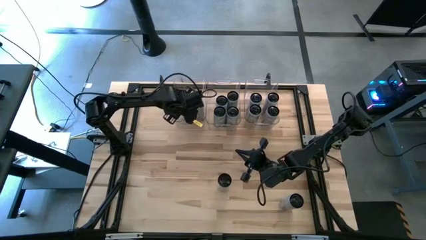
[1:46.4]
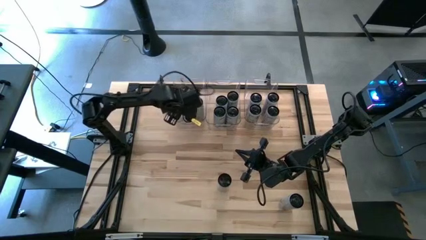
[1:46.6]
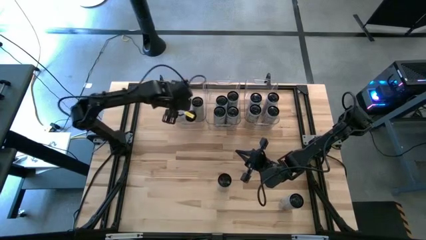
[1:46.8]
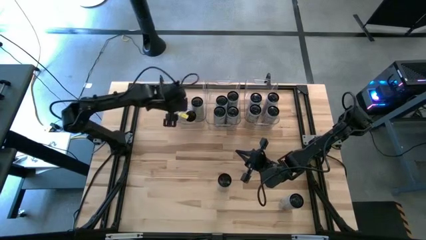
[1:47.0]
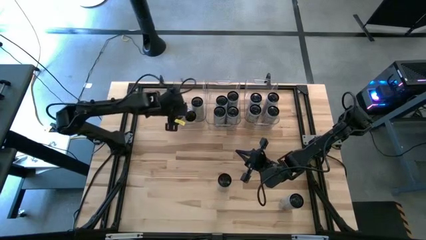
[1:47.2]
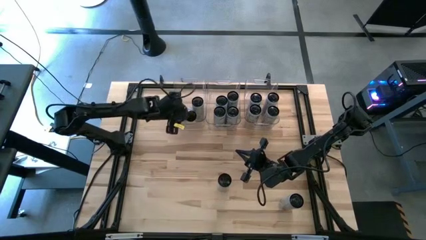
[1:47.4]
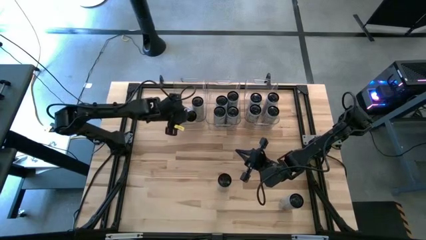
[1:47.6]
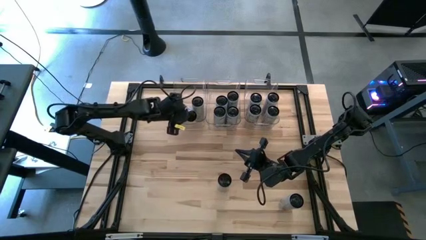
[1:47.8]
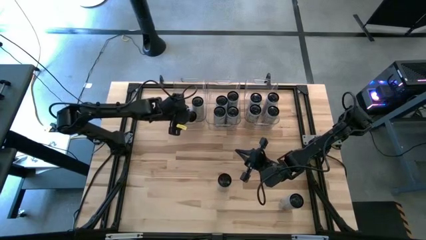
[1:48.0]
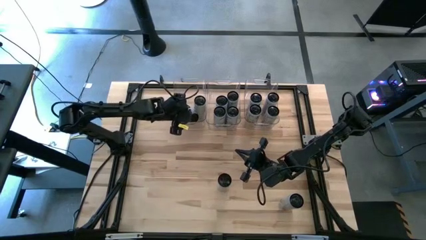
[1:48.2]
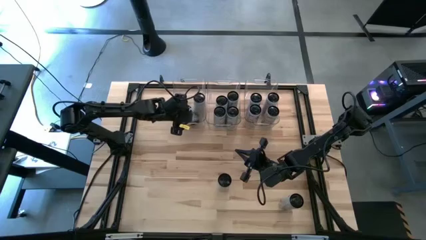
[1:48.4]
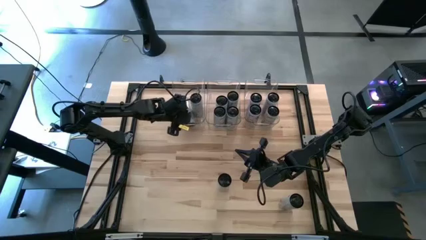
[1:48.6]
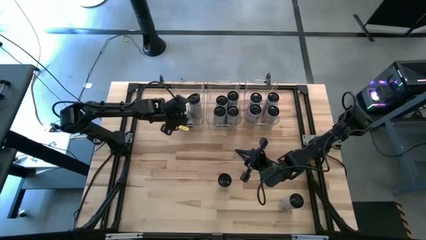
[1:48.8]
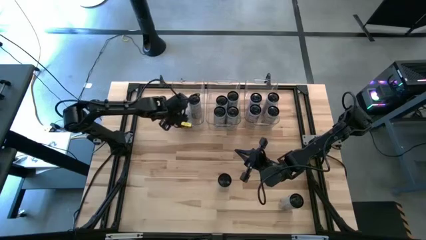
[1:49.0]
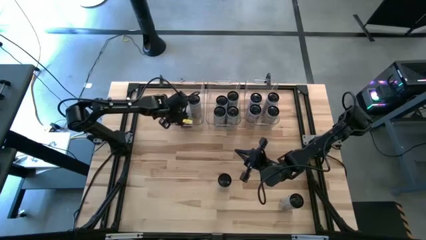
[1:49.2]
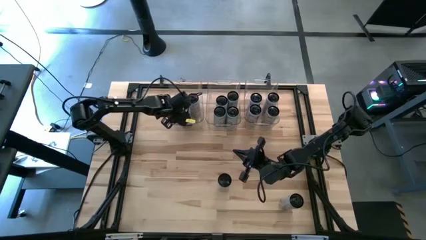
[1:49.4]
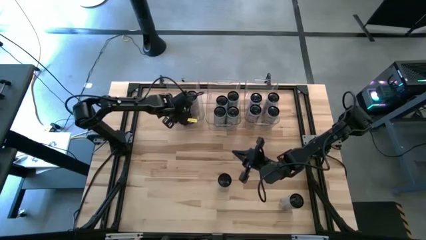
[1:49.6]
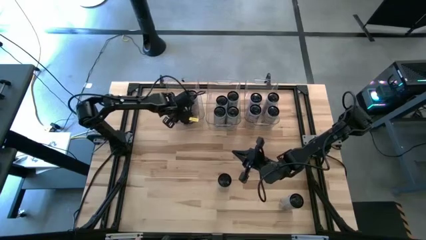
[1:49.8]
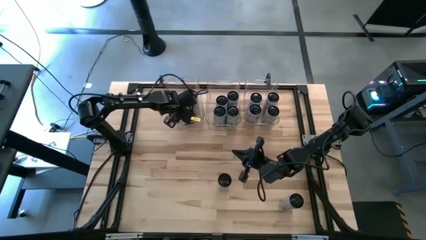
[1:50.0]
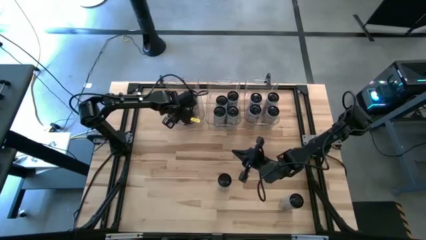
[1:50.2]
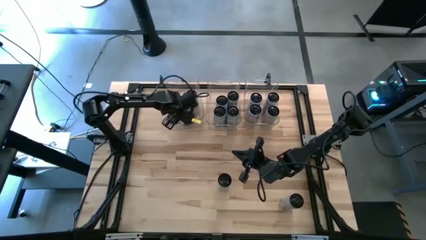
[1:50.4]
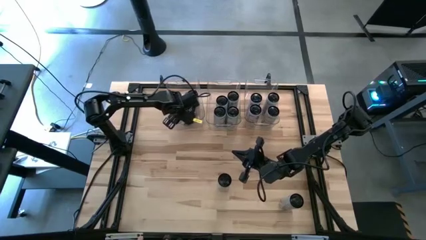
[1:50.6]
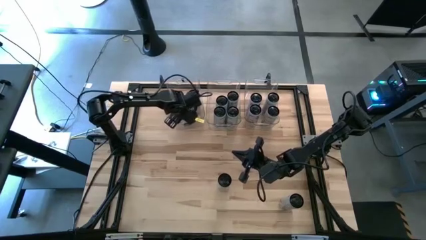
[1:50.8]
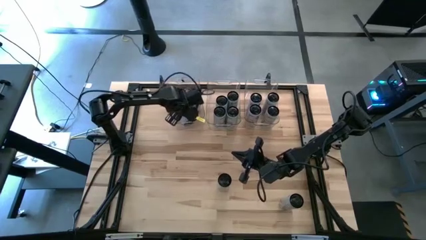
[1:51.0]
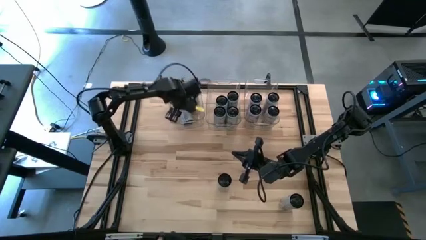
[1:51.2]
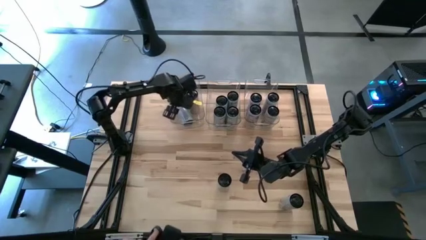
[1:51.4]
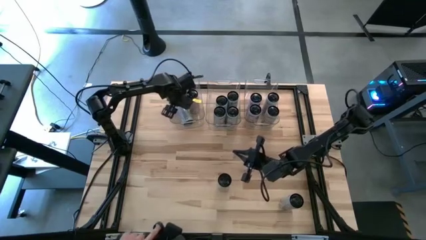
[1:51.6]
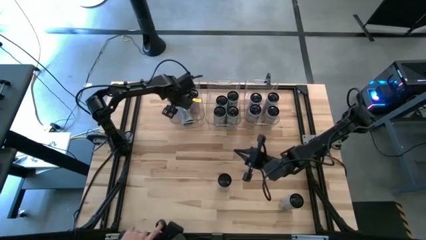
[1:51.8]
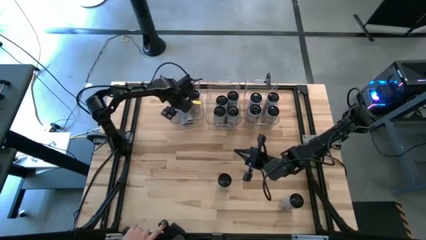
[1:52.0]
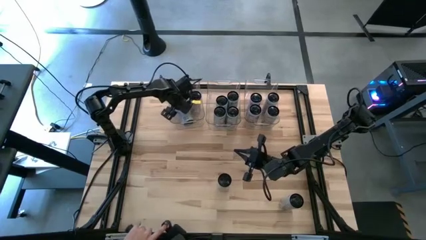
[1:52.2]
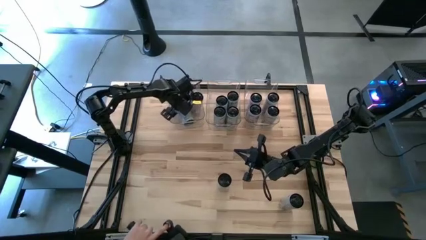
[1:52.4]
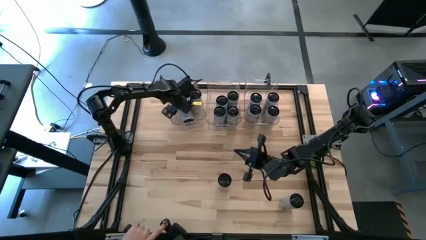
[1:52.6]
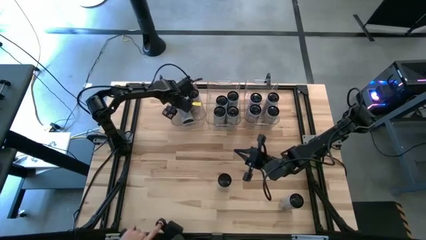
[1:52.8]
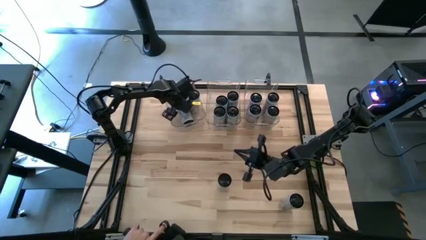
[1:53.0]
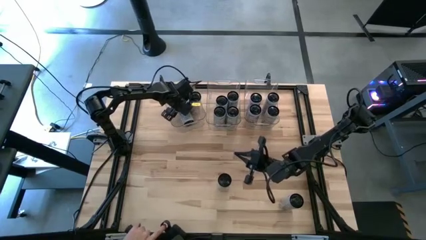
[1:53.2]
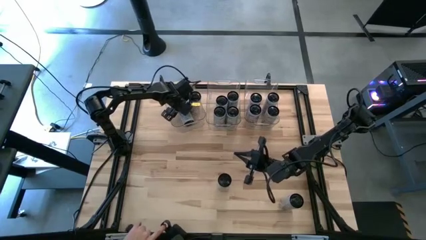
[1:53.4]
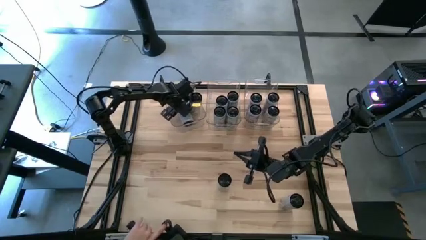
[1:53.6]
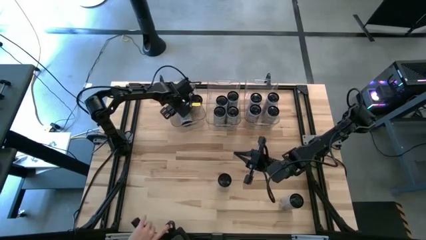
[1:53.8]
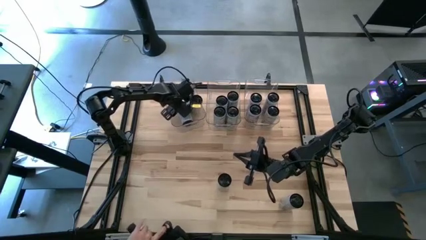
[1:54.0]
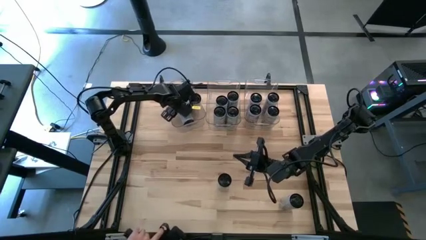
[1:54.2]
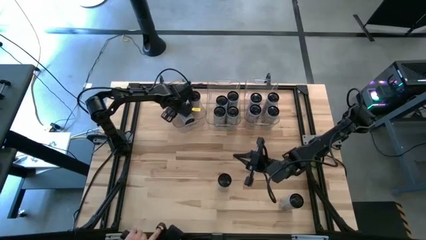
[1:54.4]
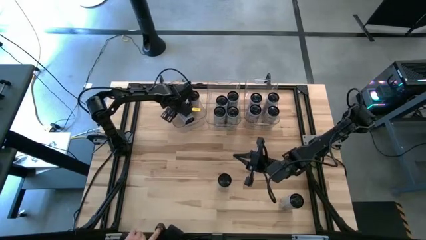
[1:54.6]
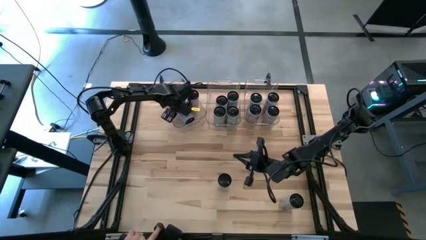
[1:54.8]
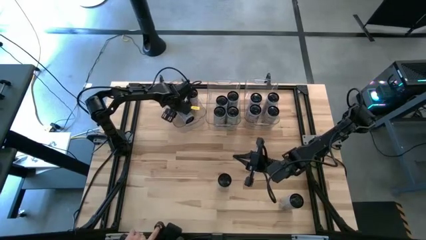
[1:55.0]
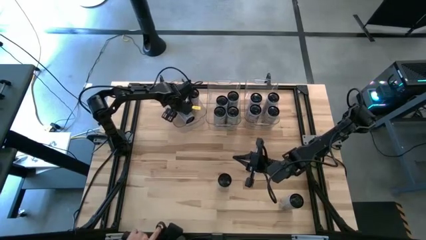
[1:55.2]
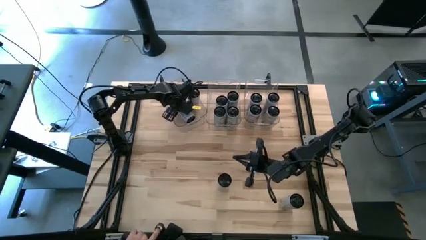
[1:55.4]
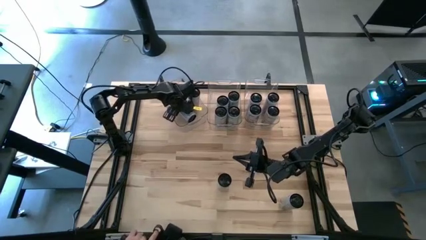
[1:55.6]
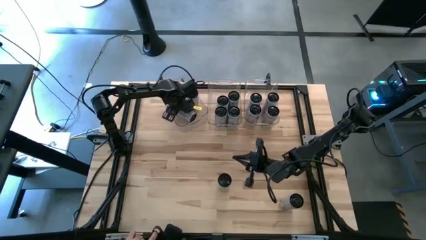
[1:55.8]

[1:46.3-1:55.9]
Task: Sort soda cans
Remove the white-yellow soda can from the left transparent bin

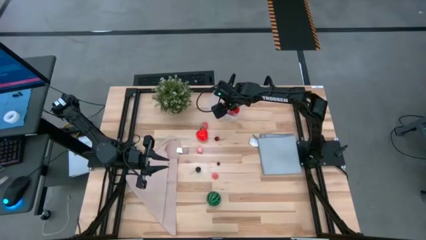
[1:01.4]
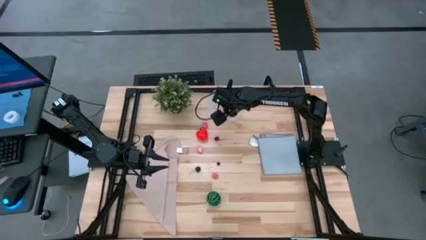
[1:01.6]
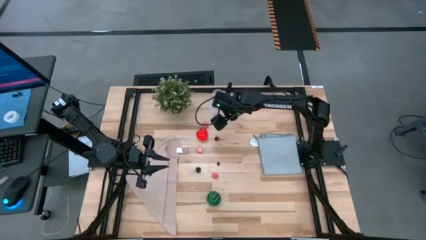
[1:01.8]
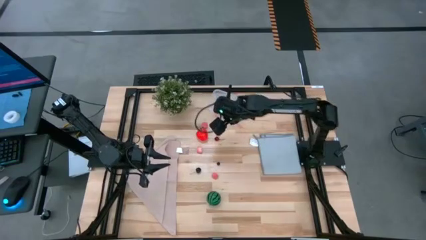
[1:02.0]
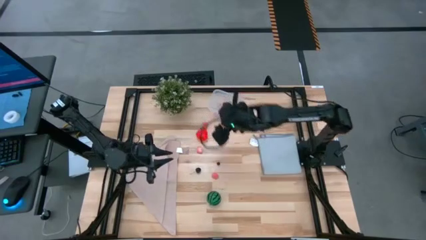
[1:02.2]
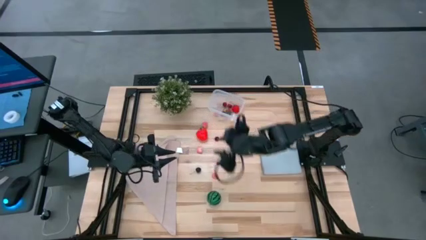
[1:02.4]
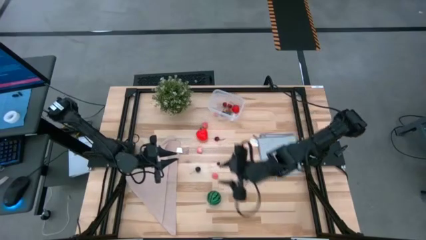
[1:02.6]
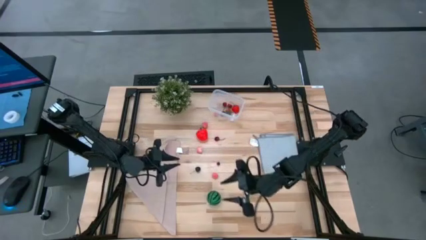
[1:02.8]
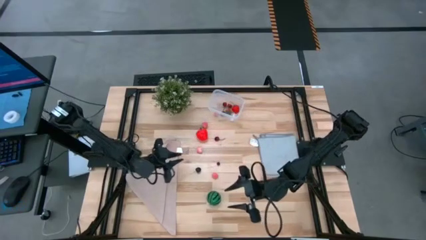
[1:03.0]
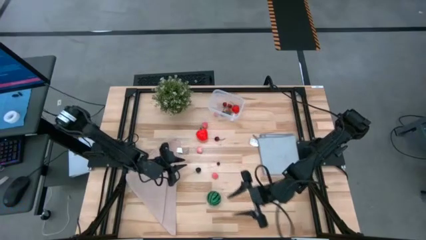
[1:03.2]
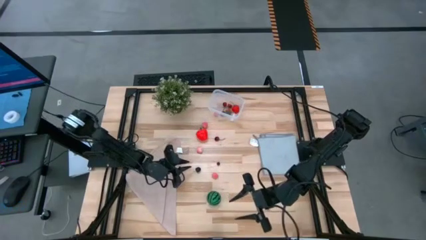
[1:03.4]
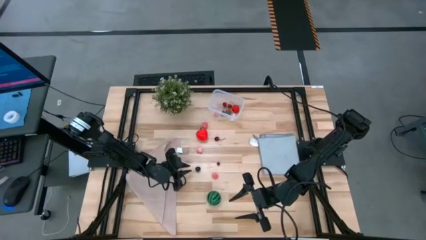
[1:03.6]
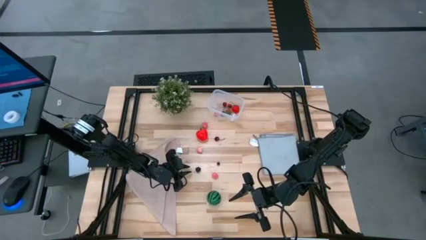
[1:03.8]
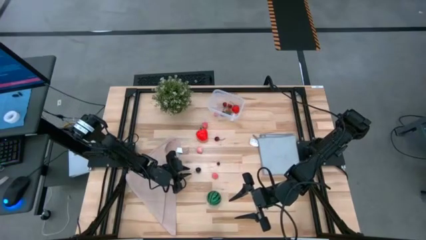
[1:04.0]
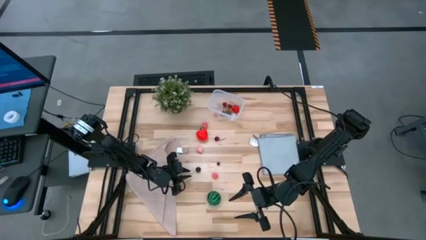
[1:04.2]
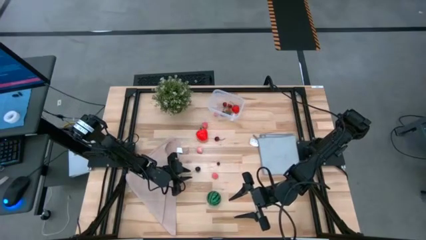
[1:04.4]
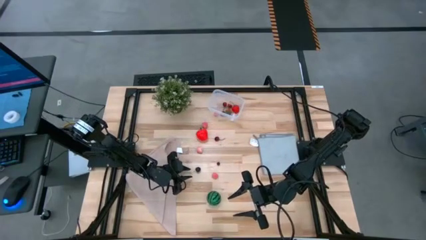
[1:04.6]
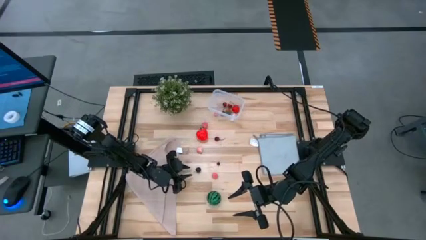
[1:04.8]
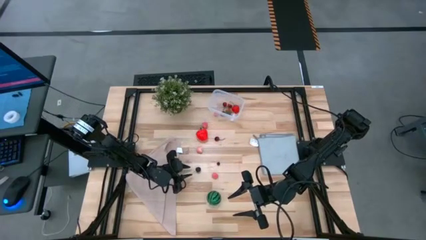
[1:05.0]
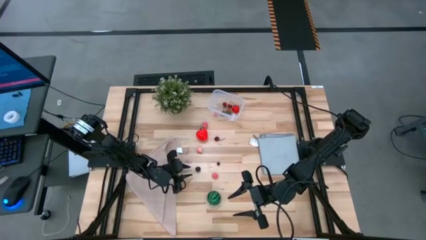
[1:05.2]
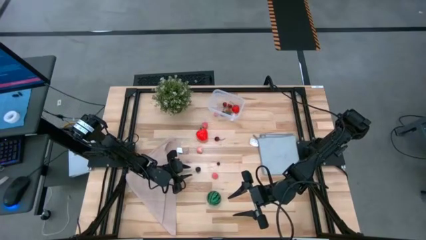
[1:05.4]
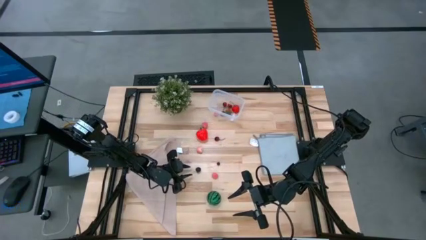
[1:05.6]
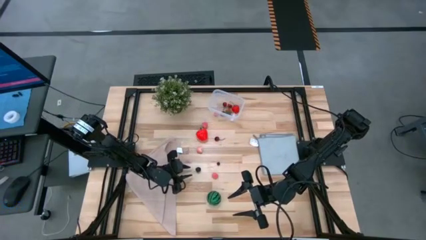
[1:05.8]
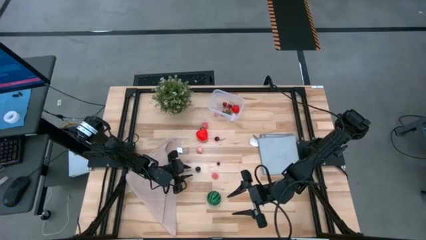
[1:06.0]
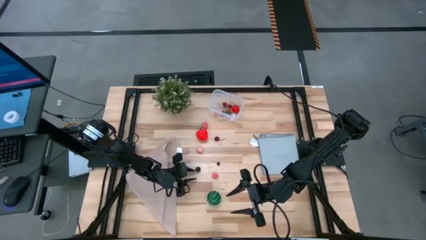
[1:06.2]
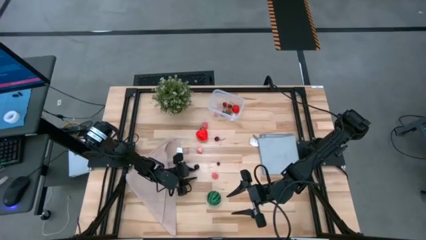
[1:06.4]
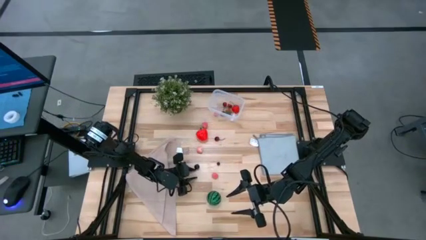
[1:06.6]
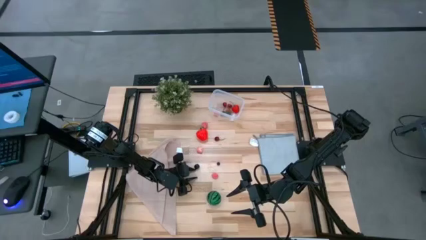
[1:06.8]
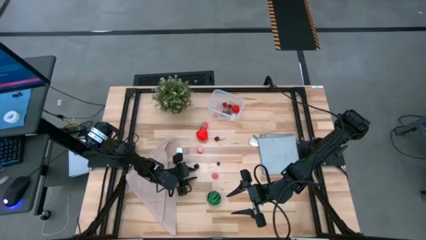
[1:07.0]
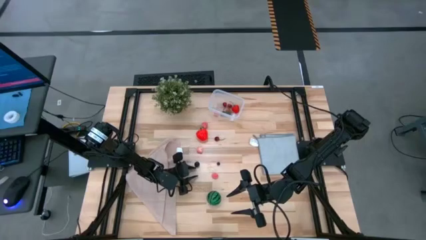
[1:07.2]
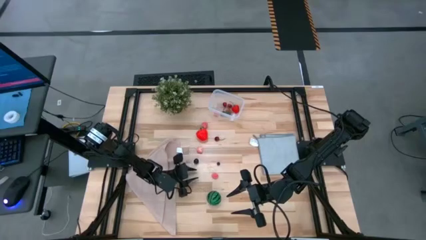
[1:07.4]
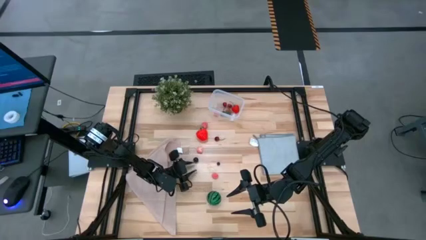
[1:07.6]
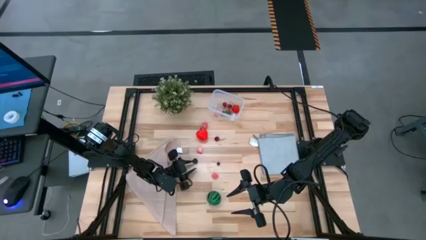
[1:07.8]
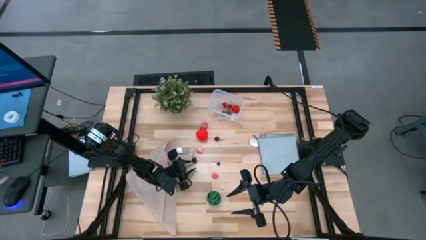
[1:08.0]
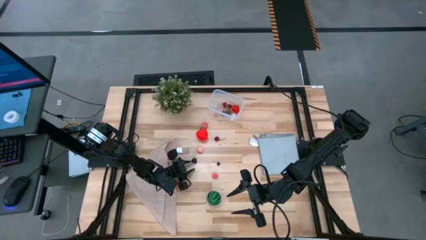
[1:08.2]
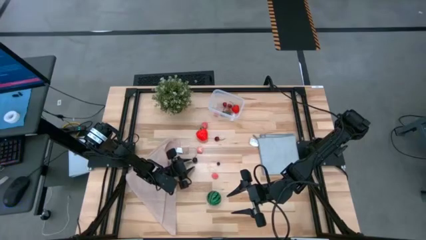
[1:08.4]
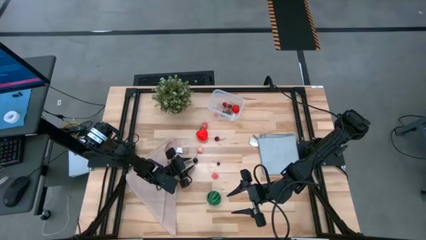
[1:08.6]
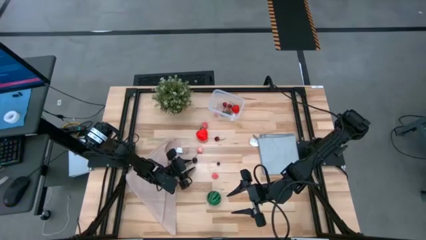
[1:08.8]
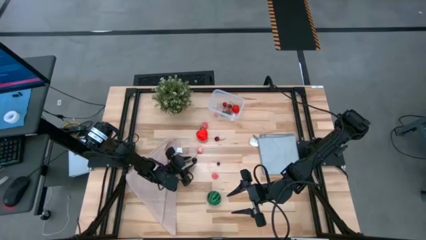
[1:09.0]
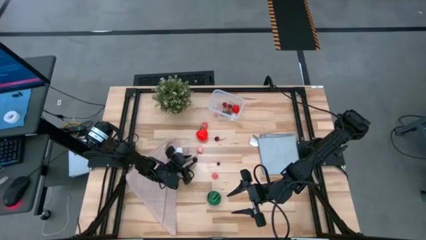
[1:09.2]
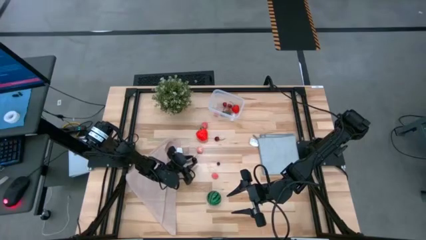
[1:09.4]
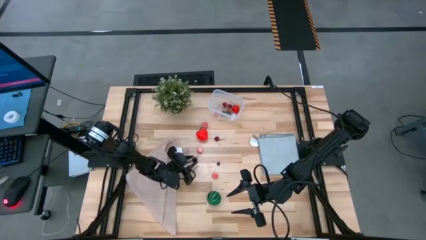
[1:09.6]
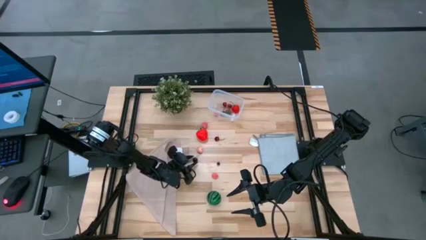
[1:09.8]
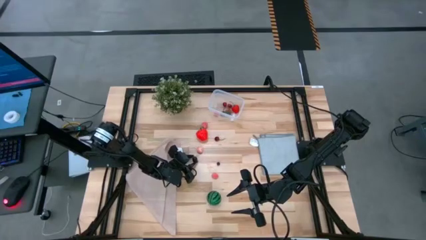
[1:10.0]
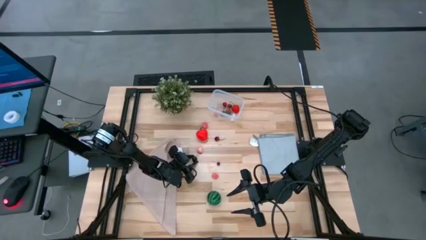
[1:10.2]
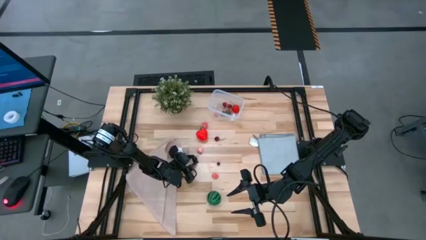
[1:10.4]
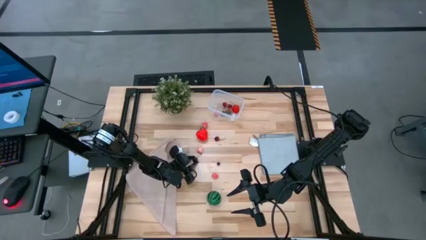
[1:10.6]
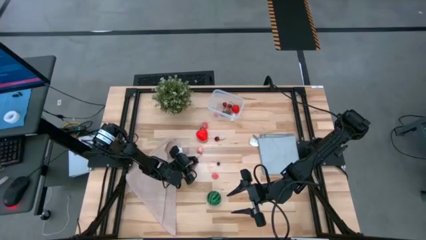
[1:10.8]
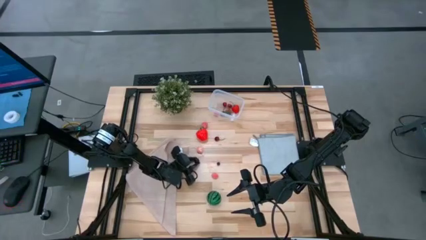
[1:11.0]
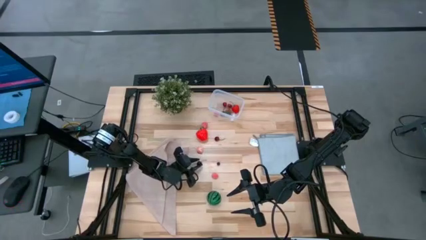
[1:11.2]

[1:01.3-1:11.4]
Task: Pick and placing Produce into tupperware
Put the black cherry into the transparent bin
